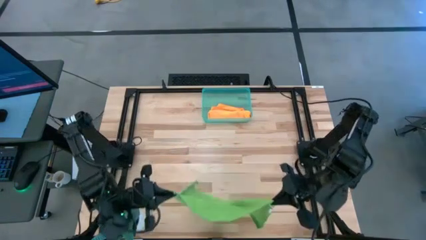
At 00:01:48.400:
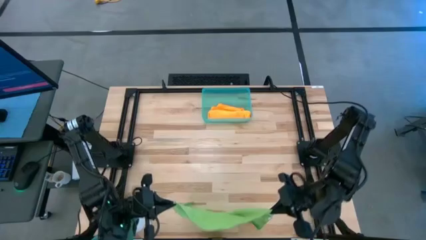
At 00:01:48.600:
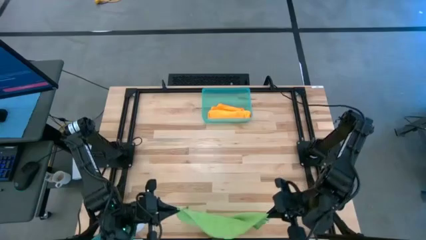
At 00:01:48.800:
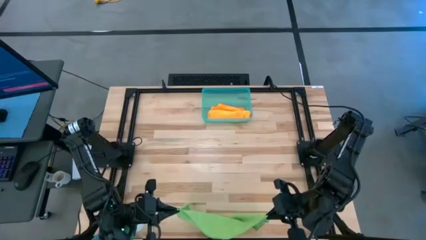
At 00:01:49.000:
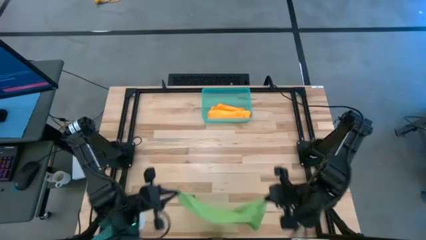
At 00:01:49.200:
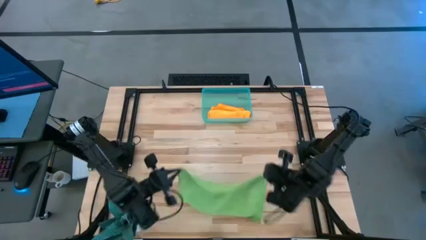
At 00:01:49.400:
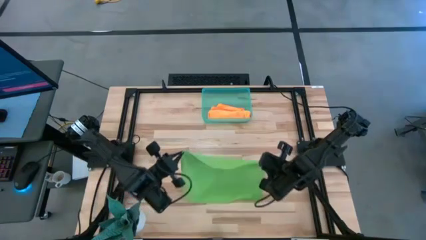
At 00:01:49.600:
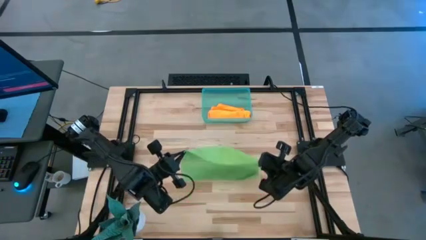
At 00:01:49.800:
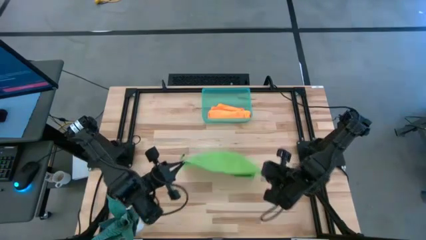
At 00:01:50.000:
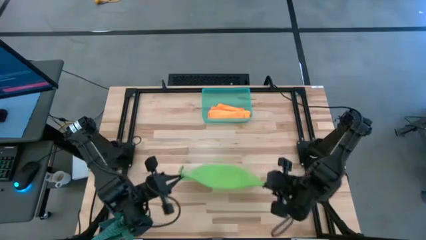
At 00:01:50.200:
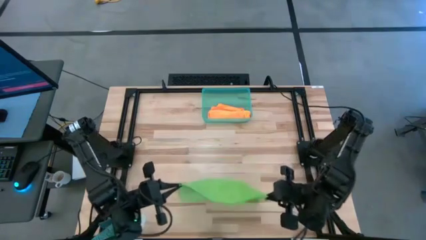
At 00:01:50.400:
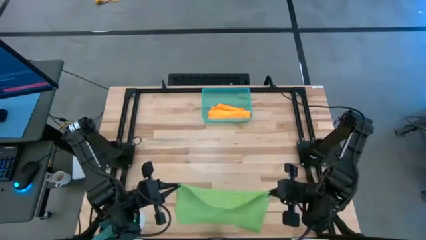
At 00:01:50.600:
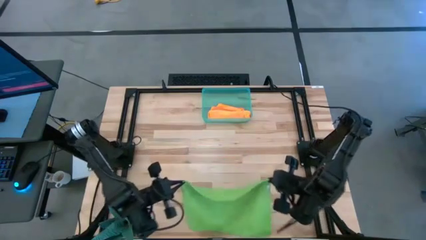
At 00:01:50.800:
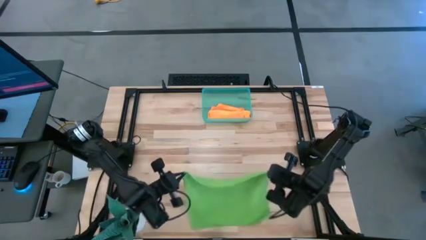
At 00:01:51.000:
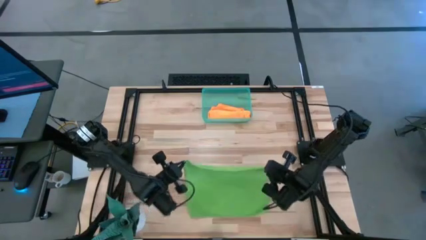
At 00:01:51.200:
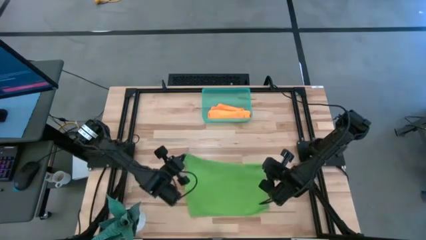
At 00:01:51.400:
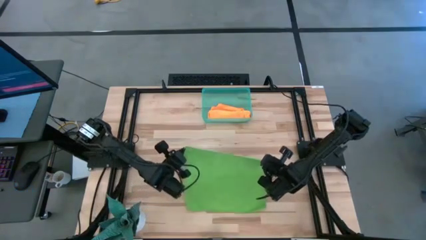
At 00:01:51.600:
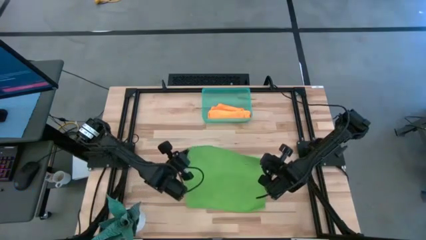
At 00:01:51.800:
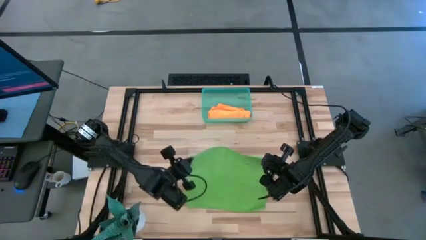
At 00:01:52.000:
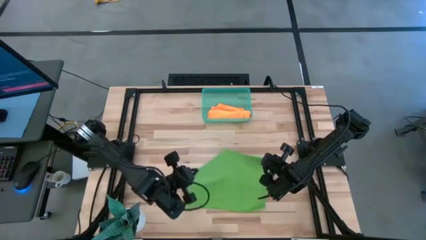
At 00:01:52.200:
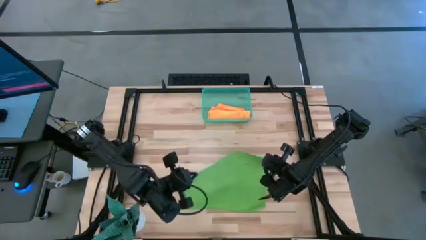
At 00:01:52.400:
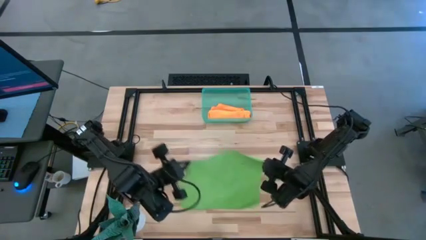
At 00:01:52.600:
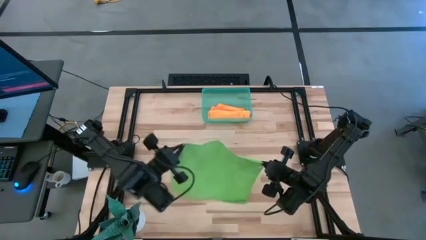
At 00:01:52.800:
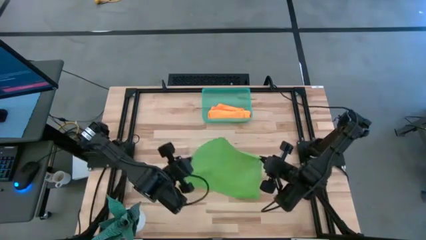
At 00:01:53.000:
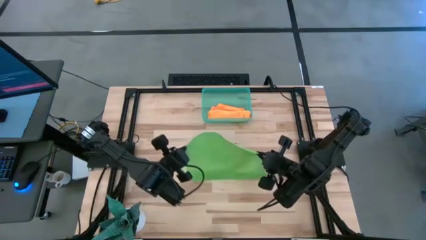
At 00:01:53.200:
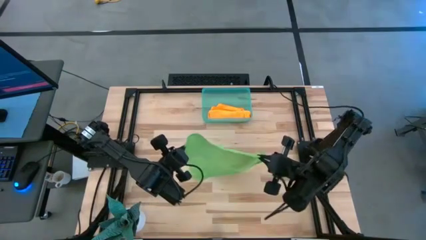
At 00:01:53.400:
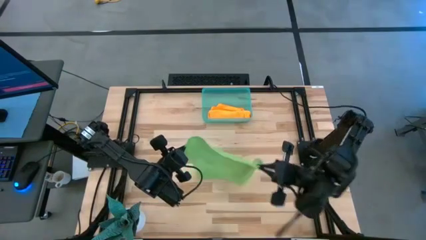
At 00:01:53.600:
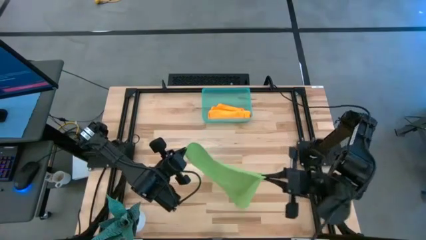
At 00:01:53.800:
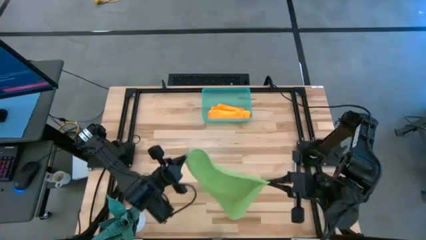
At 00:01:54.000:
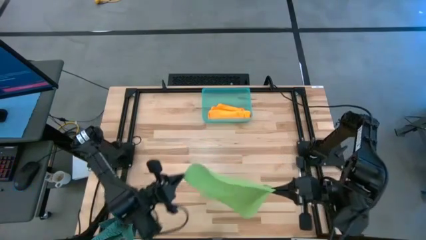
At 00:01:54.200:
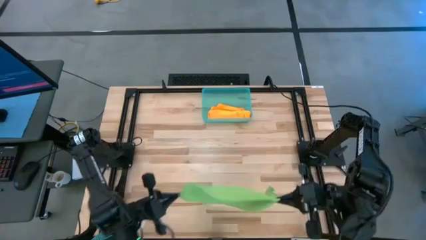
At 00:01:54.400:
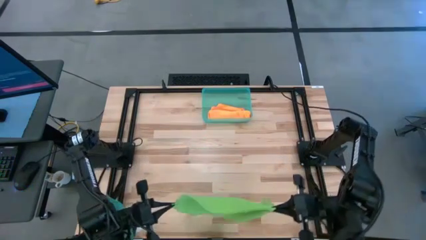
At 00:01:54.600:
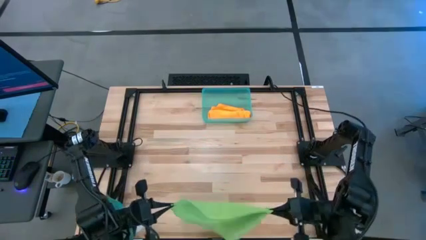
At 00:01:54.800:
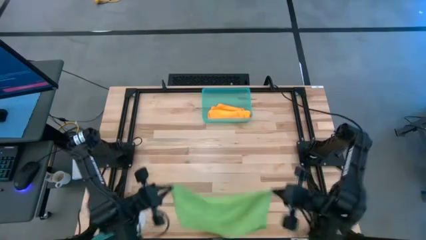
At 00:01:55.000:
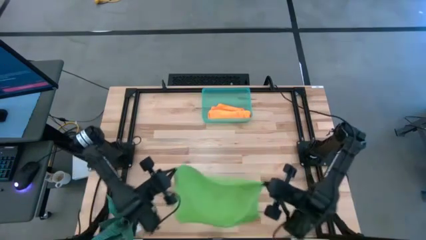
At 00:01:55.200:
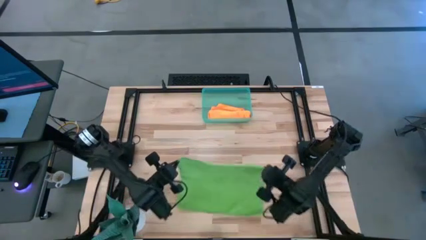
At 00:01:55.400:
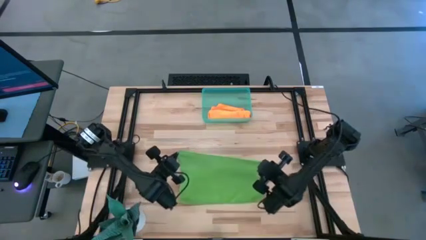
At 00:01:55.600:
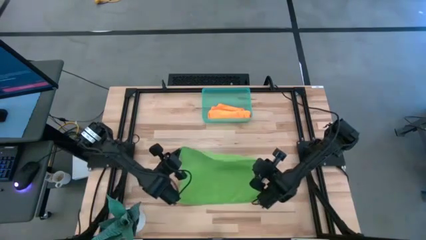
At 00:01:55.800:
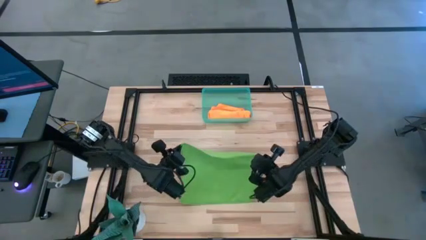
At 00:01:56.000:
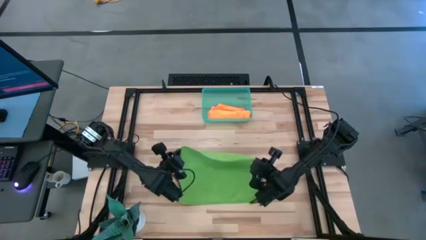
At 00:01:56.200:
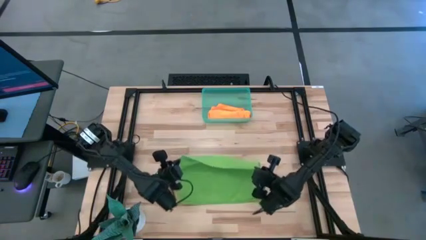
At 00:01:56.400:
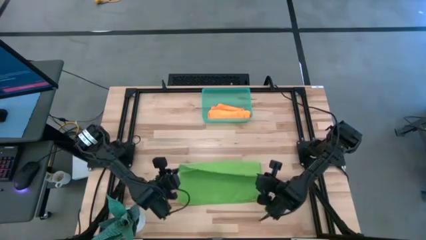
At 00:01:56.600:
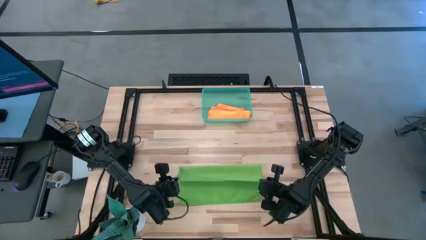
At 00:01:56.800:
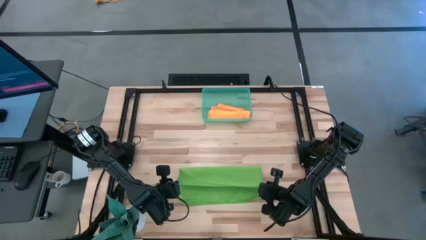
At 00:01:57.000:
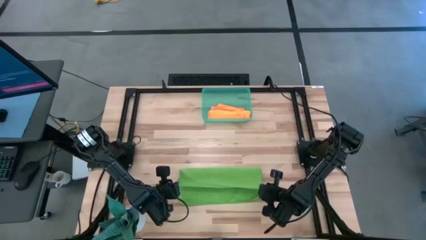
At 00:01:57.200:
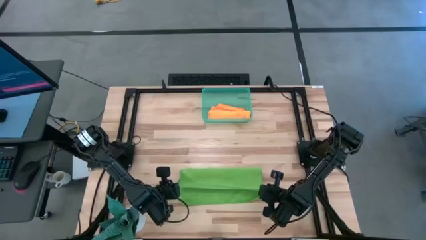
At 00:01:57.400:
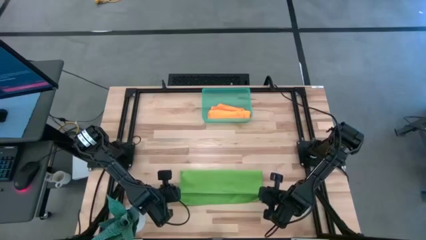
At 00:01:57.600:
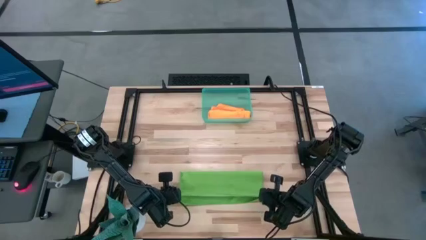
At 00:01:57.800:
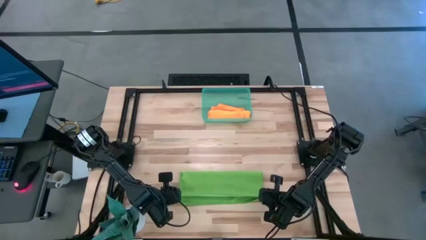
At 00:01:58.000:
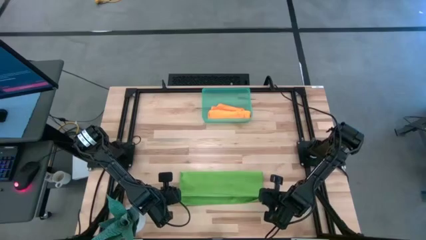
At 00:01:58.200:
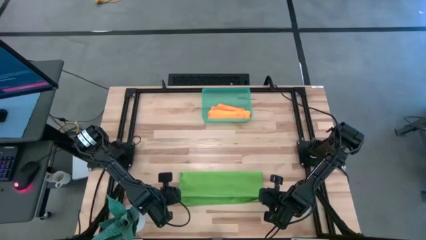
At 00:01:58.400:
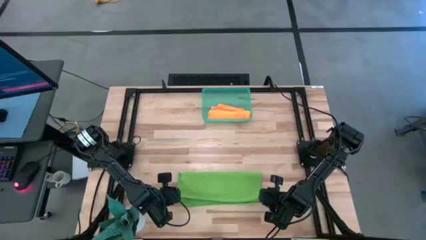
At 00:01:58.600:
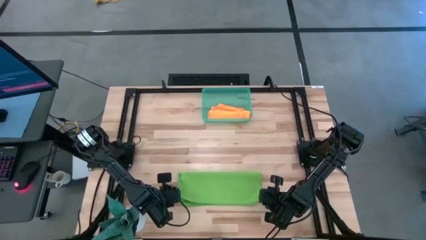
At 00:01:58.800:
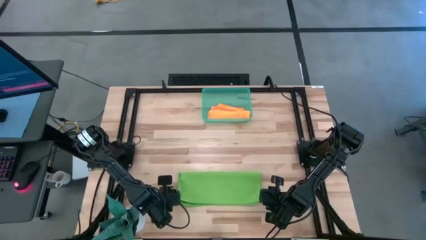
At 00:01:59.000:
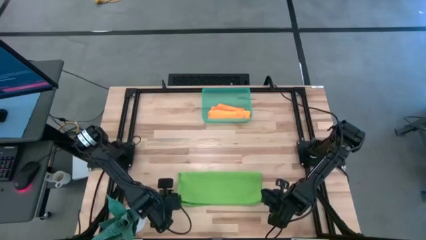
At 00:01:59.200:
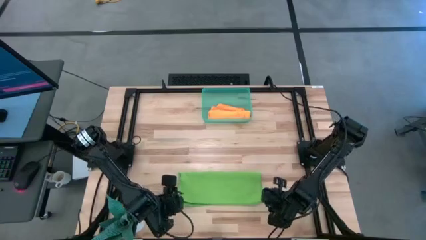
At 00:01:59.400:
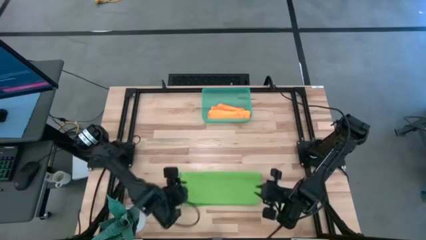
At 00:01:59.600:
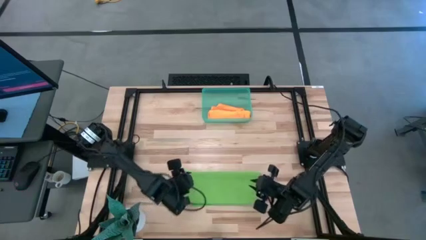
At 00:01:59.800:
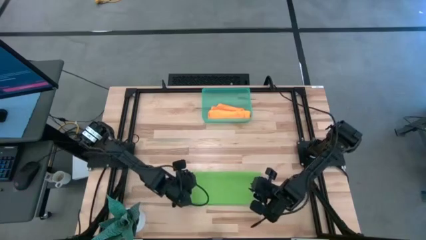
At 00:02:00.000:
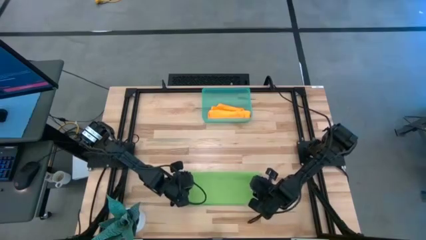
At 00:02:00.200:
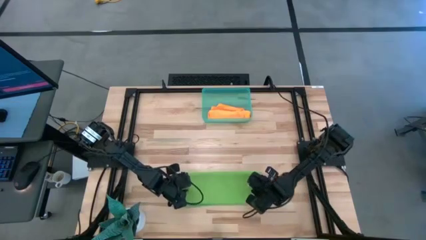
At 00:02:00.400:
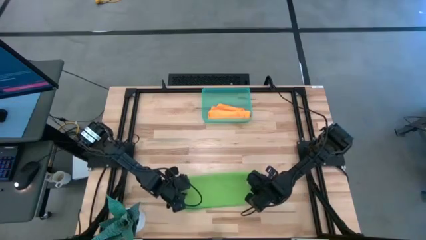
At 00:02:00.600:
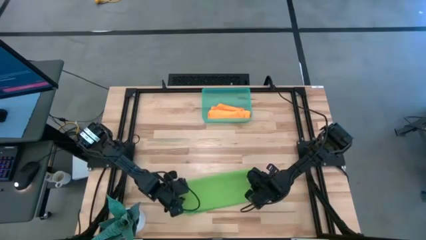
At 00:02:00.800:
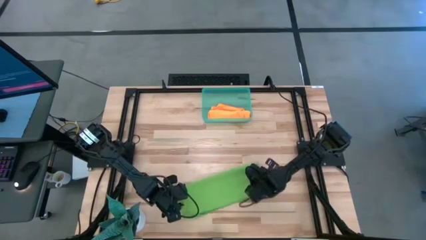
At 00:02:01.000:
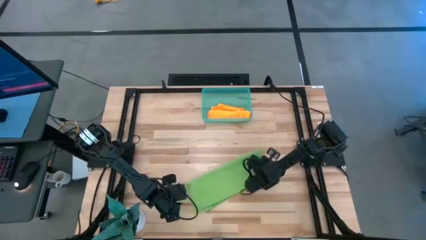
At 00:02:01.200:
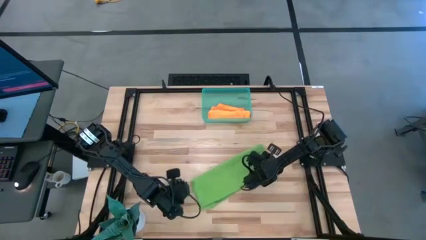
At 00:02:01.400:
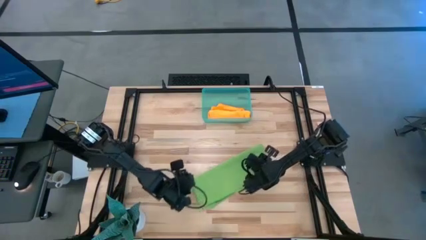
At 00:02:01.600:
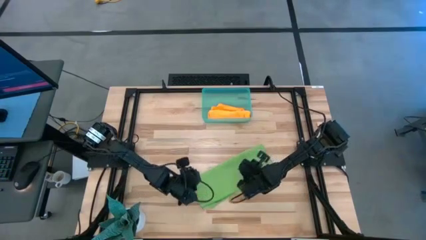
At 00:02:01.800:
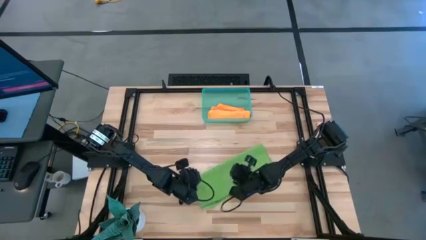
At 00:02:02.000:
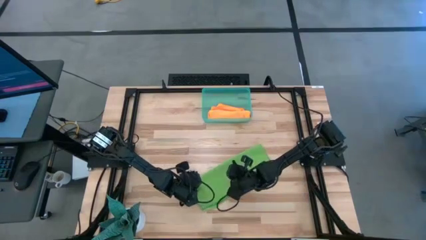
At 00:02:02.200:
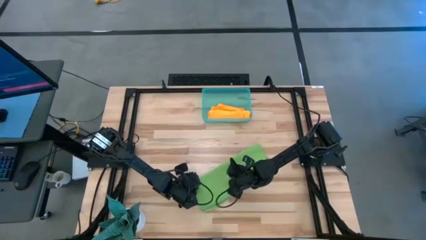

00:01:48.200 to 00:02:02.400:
Task: Roll microfiber towels into tight, uniform cylinder then place into a basket
Fold the green microfiber towel
